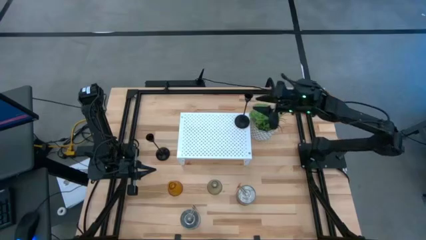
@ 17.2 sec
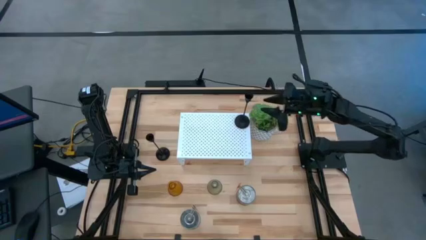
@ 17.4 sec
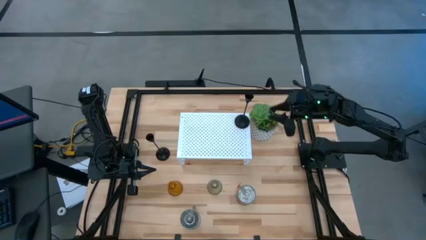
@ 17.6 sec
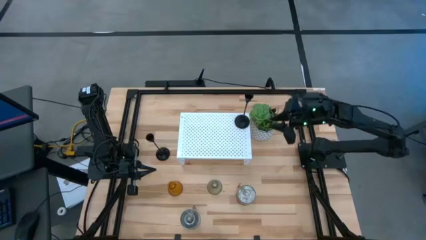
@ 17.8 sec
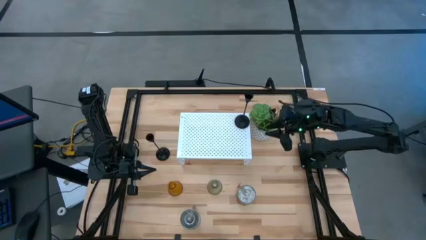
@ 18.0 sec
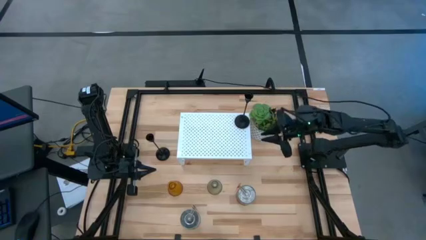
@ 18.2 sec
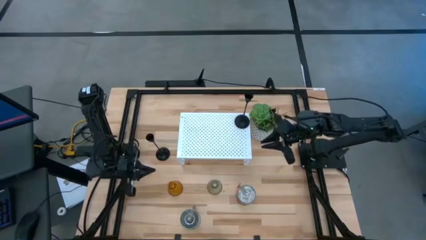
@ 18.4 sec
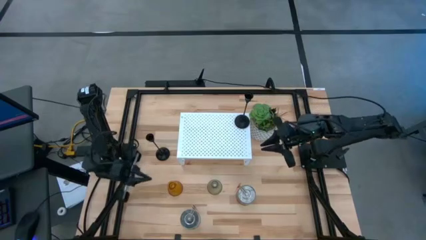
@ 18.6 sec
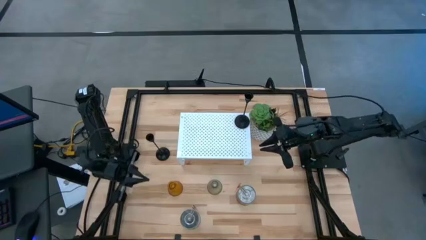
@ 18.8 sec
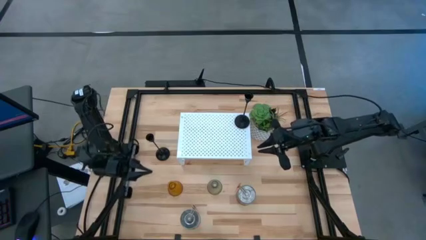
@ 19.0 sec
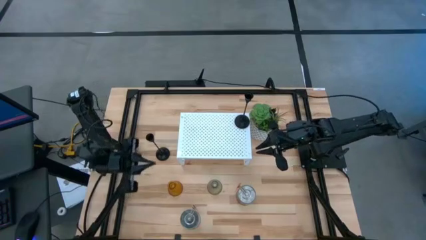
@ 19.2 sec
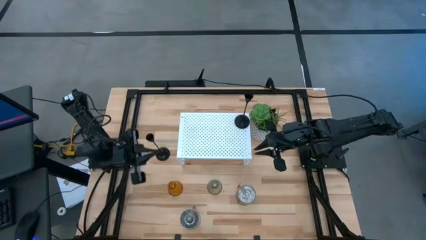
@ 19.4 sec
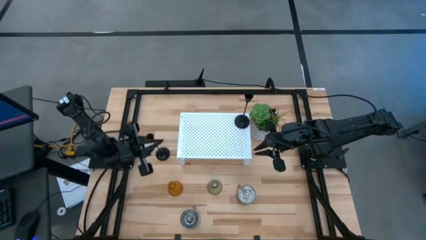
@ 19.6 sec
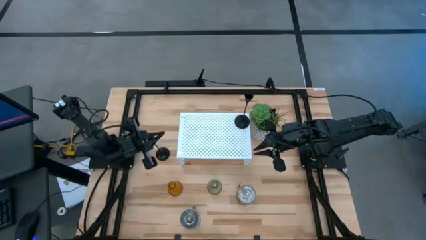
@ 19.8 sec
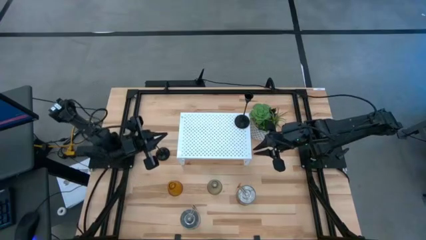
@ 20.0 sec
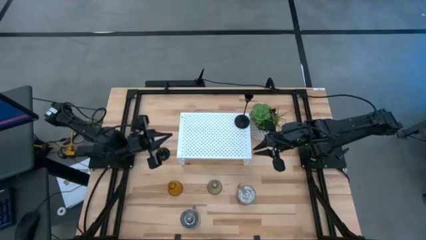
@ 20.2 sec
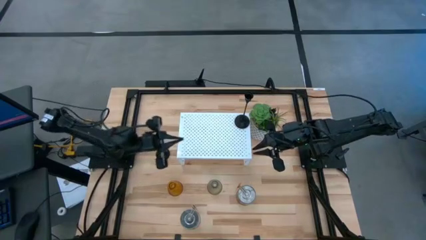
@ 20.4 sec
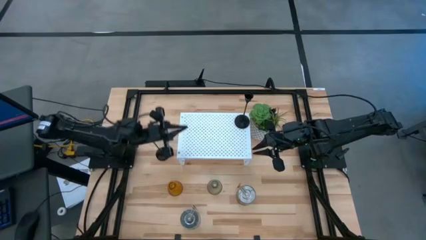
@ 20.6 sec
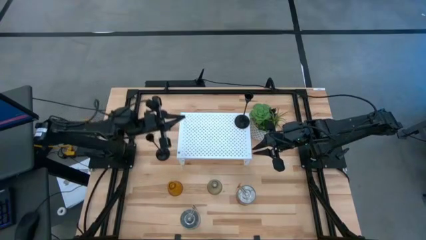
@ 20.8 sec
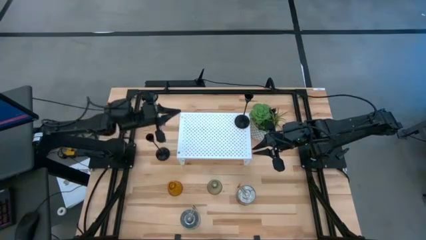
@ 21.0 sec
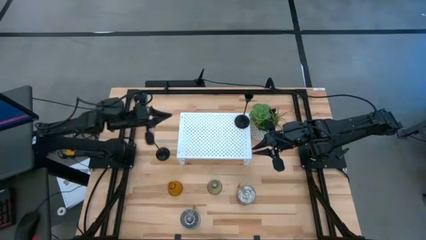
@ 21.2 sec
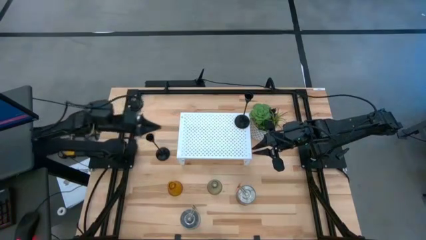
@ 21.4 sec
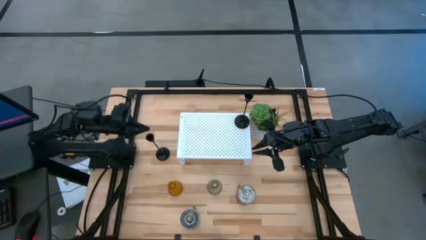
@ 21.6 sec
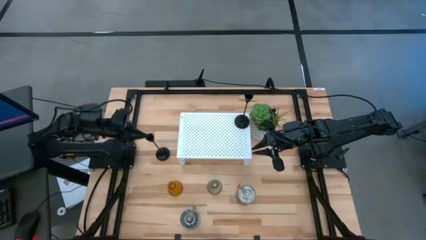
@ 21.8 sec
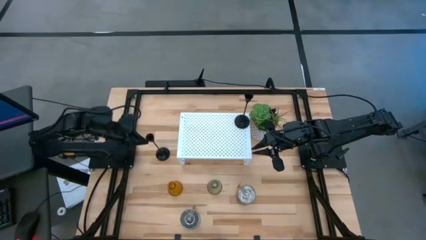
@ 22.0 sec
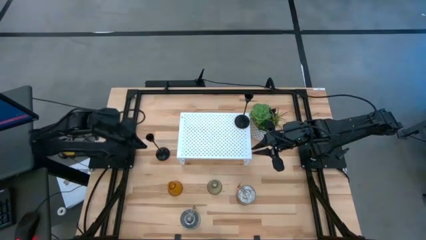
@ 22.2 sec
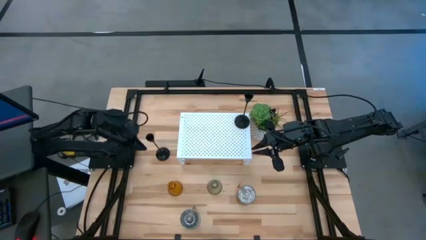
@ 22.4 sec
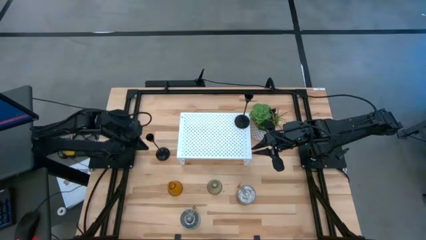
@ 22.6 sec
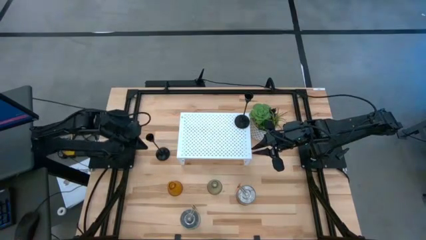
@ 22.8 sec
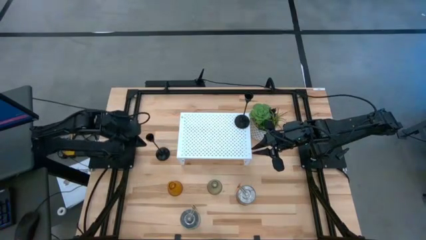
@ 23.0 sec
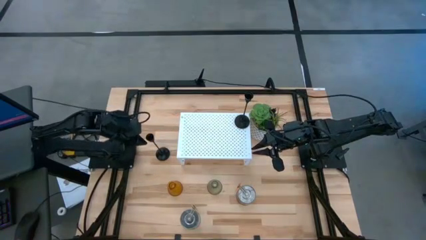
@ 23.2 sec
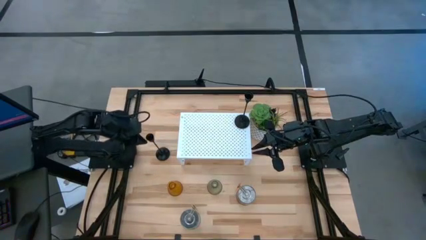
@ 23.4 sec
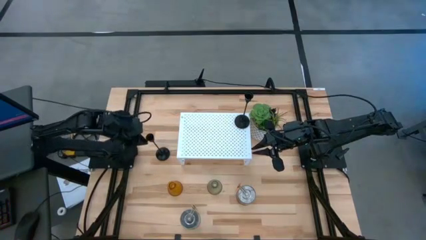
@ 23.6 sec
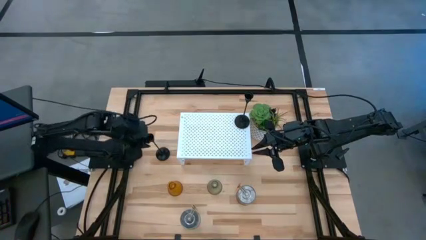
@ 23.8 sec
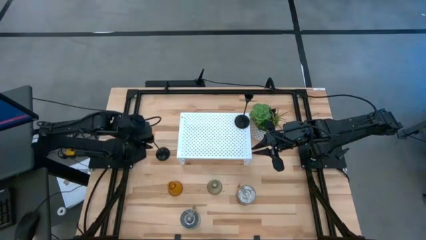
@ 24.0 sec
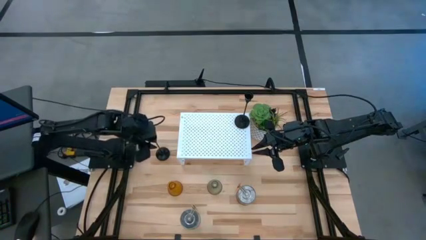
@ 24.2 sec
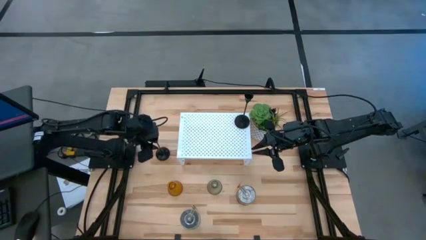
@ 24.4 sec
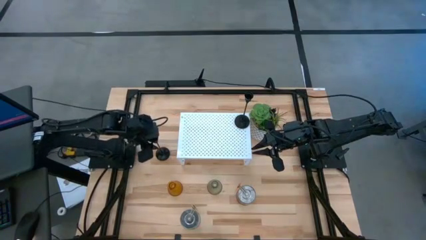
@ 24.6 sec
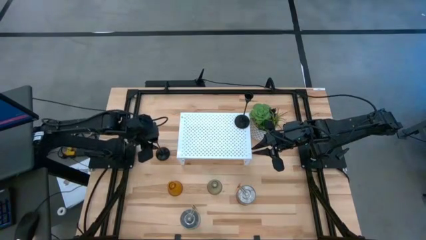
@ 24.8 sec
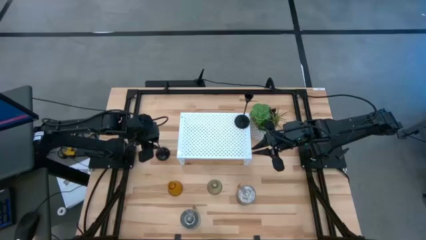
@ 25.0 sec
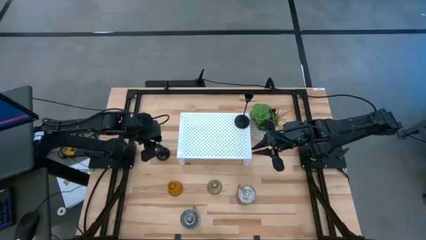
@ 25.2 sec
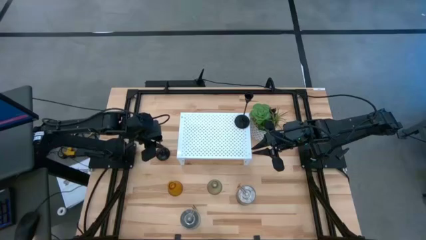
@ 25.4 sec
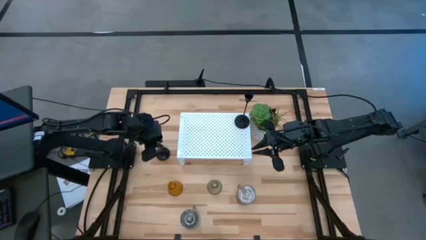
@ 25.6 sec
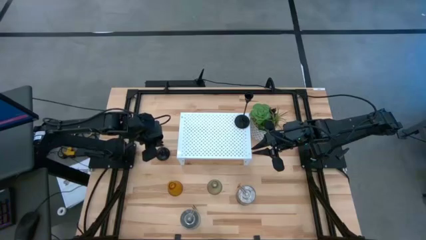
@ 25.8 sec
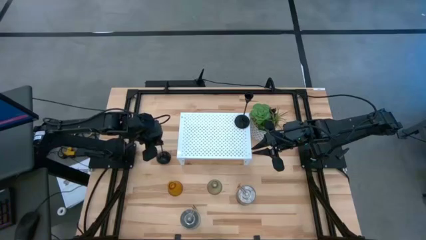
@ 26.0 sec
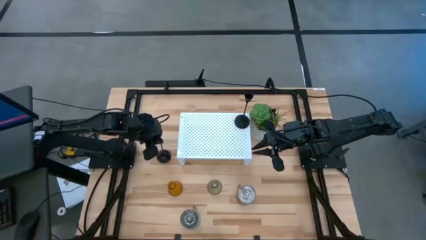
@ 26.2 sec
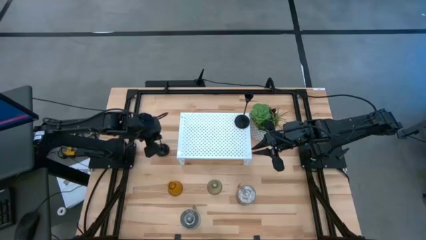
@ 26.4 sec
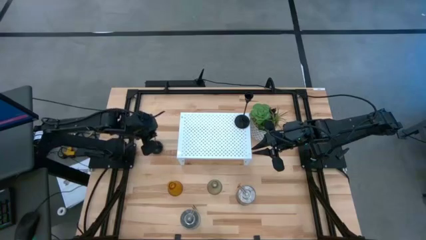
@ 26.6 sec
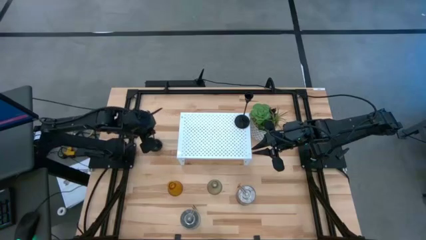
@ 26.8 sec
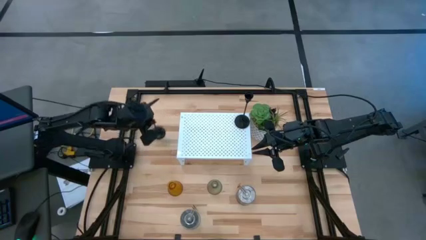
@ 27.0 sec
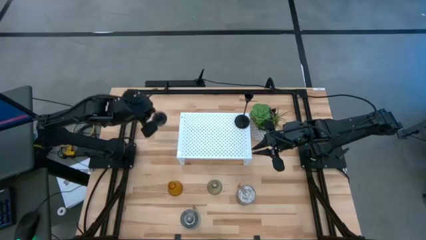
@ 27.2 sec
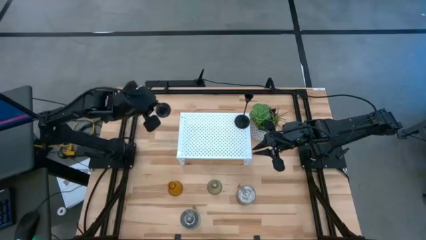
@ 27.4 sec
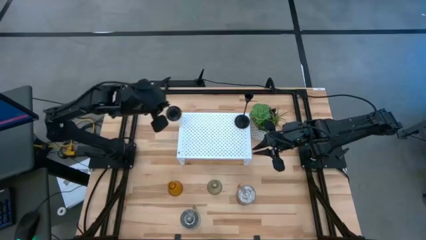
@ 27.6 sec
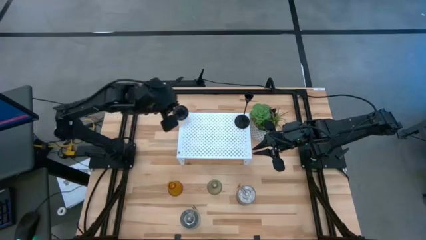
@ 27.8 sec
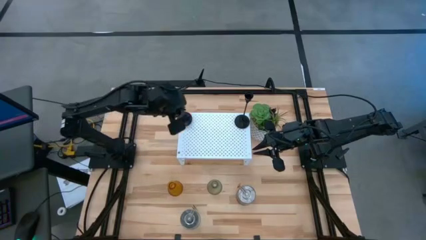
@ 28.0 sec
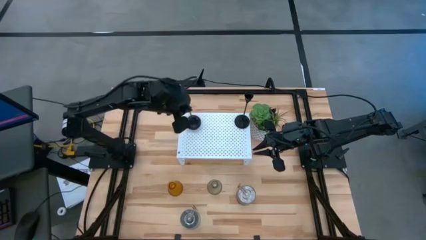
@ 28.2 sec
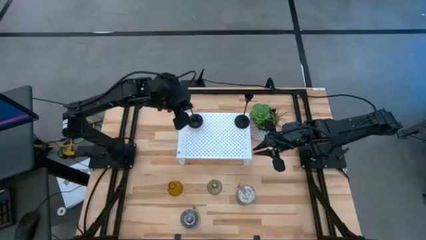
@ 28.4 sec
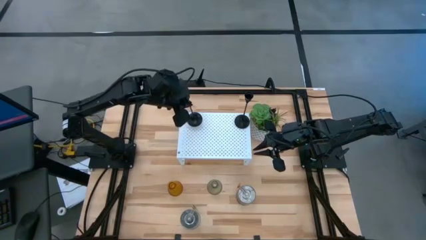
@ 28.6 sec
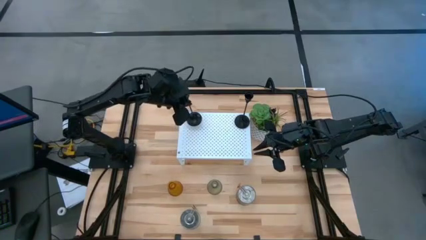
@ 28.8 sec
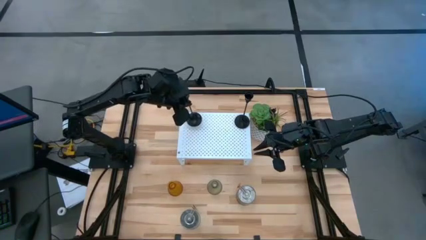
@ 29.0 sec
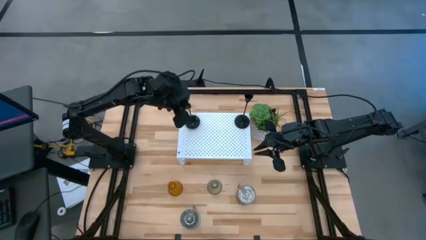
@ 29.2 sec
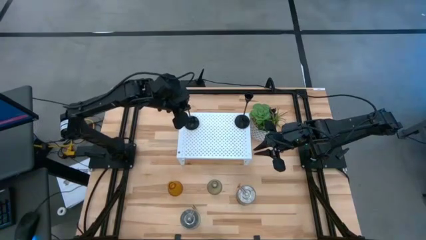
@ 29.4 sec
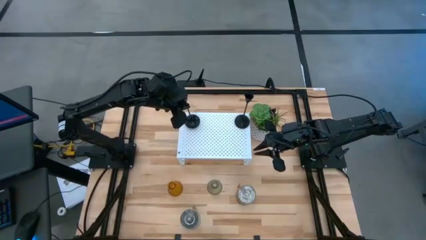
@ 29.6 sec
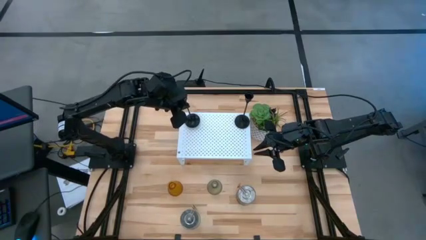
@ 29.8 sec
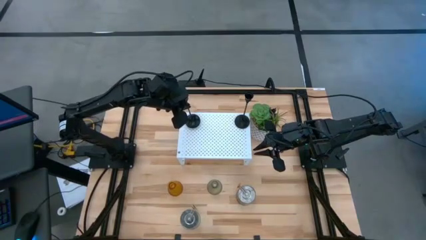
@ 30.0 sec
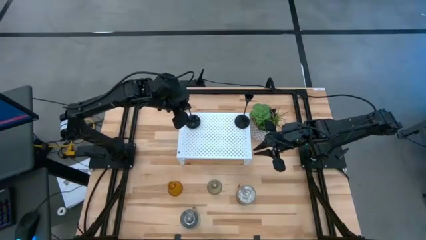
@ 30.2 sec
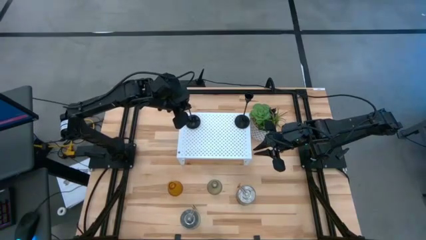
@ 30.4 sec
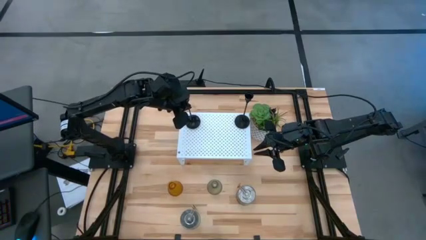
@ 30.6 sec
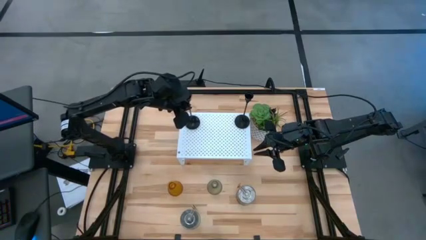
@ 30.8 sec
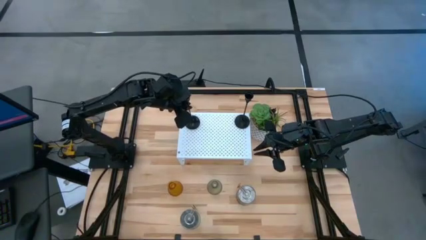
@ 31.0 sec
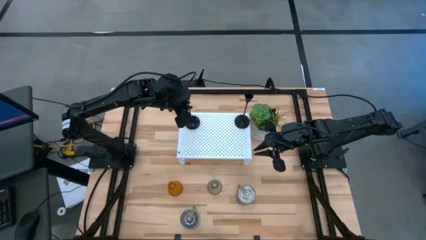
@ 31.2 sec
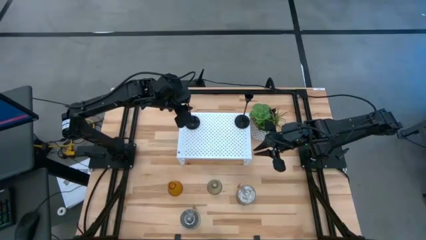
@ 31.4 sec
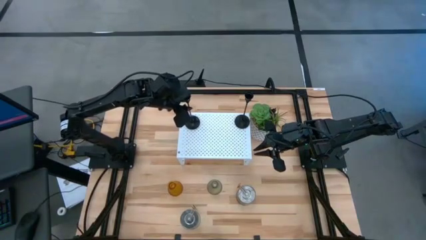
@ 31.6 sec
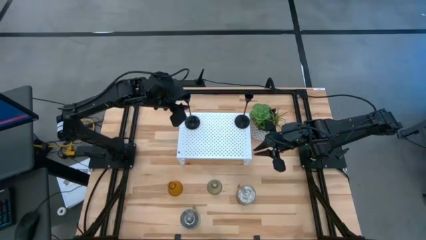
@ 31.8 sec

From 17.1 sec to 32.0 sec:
Task: Pick & Place candle stick holders
Put the black candle holder on the shelf
